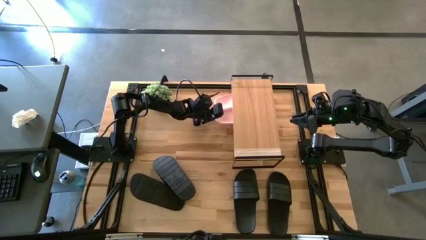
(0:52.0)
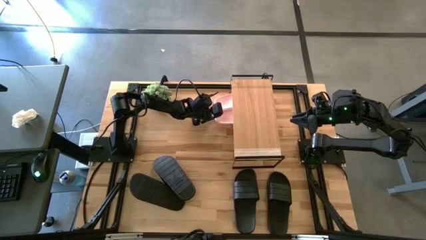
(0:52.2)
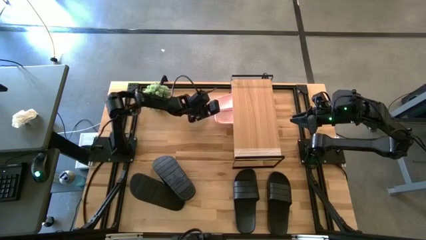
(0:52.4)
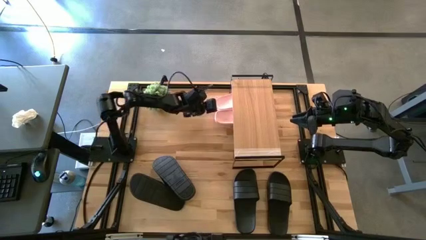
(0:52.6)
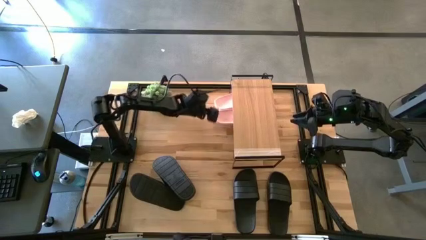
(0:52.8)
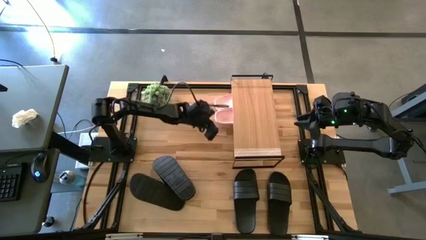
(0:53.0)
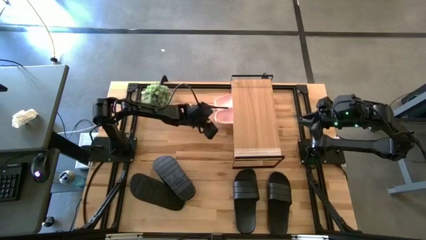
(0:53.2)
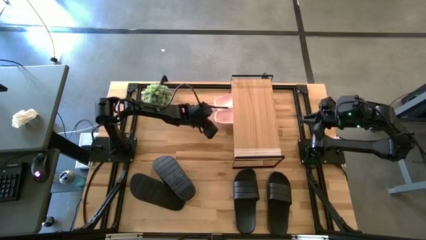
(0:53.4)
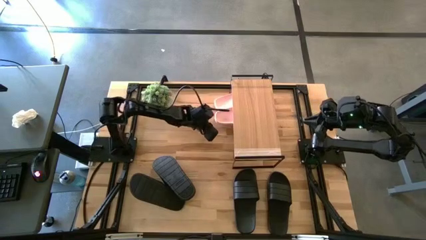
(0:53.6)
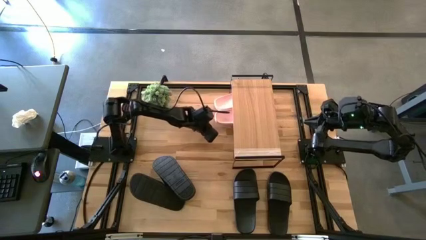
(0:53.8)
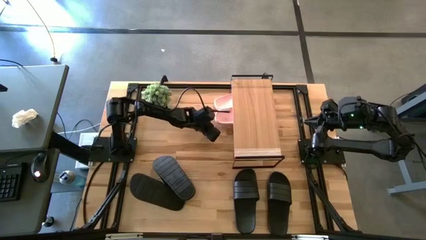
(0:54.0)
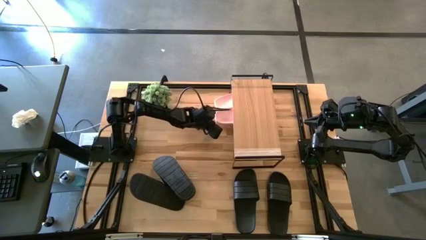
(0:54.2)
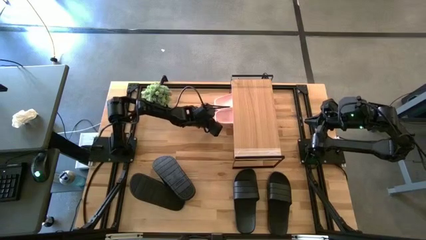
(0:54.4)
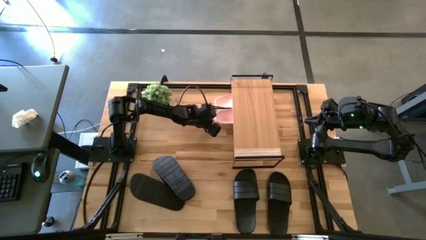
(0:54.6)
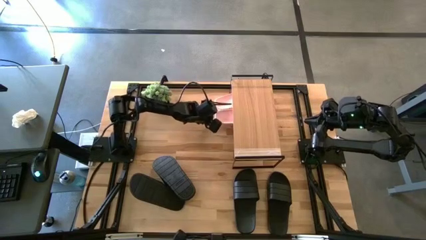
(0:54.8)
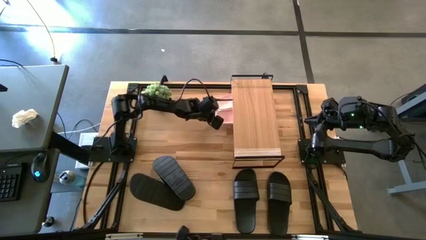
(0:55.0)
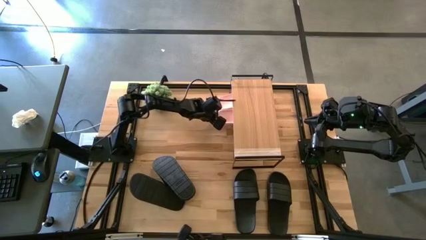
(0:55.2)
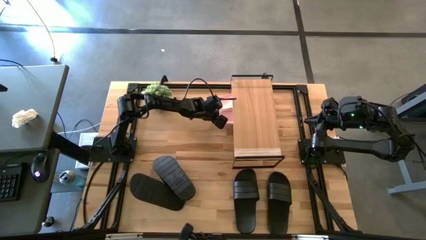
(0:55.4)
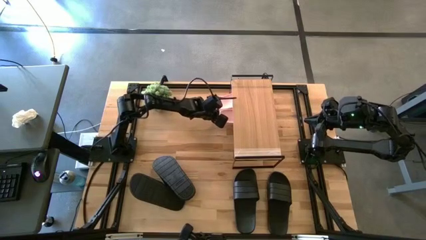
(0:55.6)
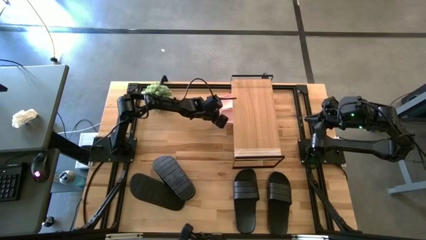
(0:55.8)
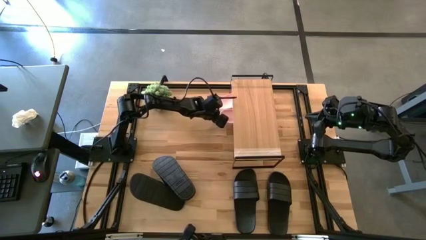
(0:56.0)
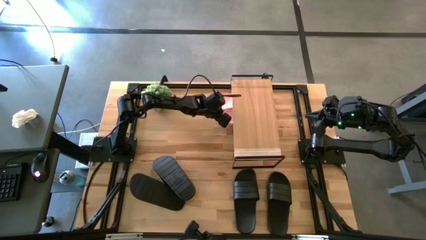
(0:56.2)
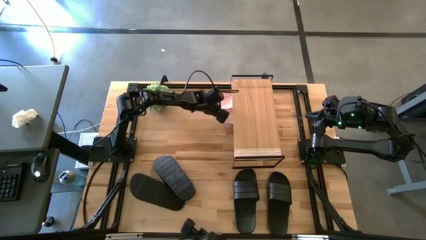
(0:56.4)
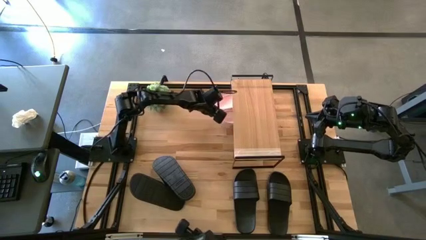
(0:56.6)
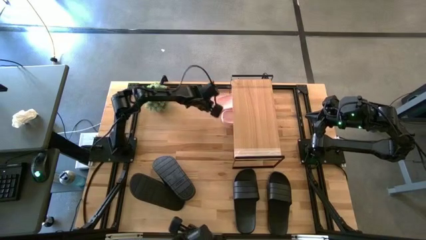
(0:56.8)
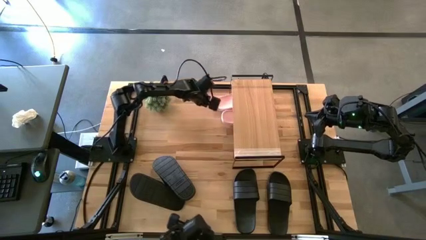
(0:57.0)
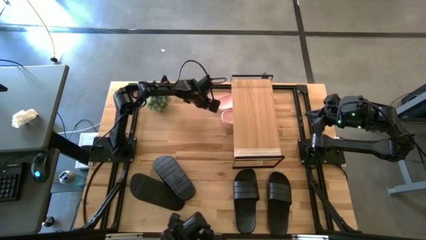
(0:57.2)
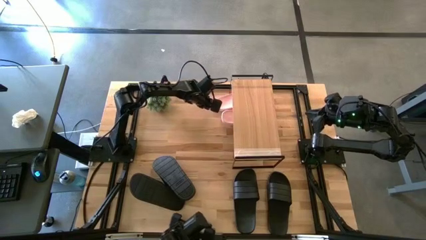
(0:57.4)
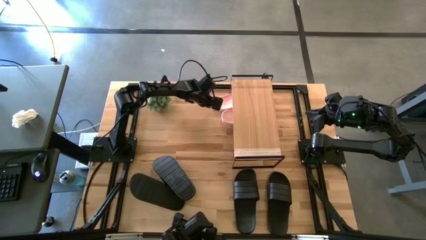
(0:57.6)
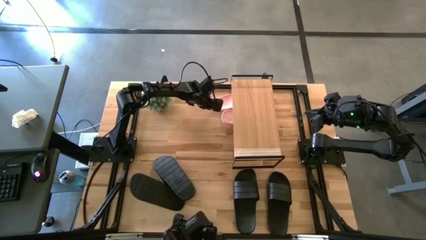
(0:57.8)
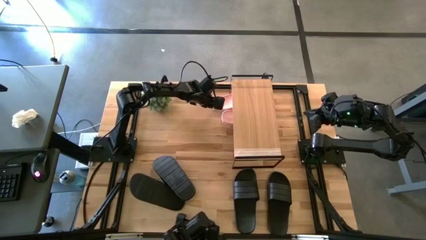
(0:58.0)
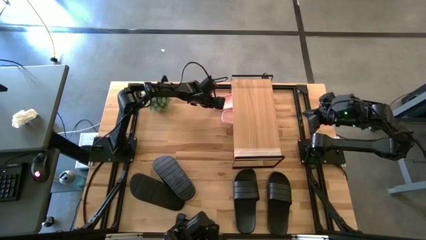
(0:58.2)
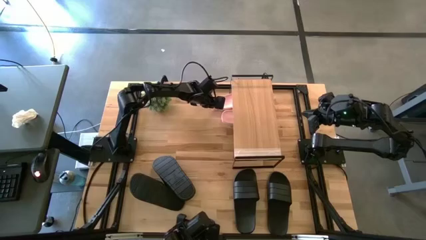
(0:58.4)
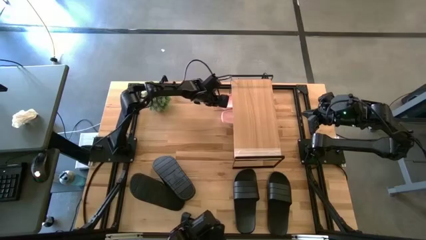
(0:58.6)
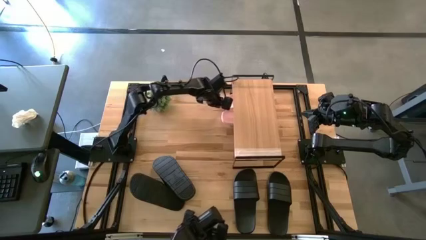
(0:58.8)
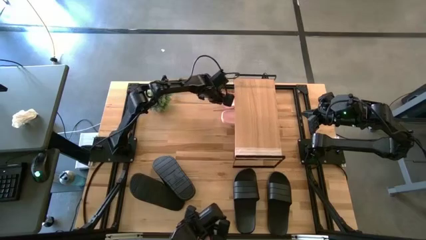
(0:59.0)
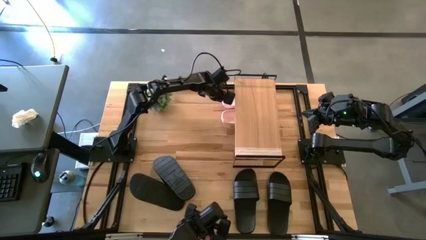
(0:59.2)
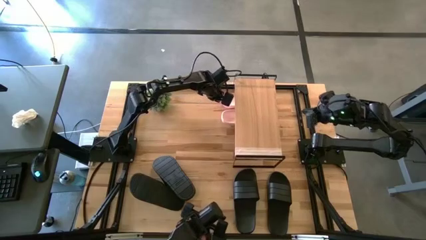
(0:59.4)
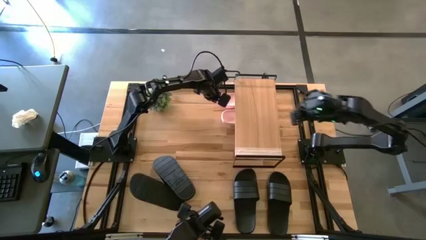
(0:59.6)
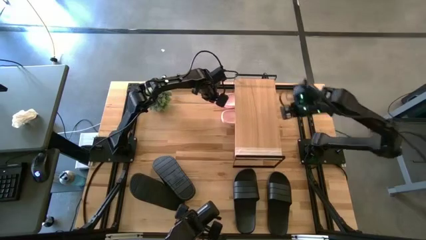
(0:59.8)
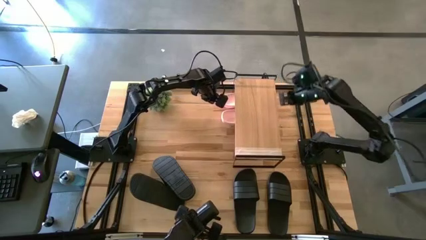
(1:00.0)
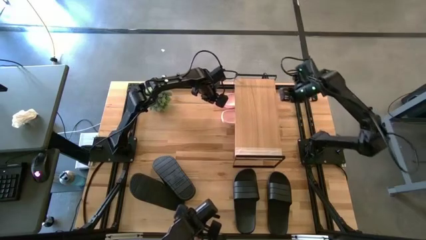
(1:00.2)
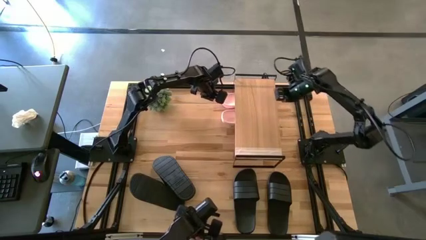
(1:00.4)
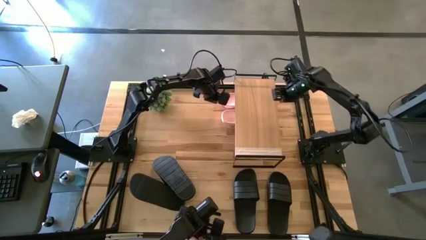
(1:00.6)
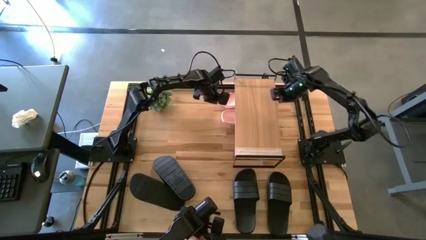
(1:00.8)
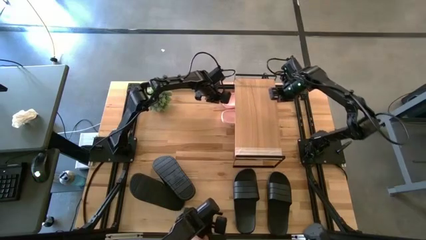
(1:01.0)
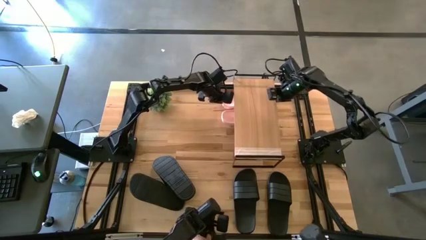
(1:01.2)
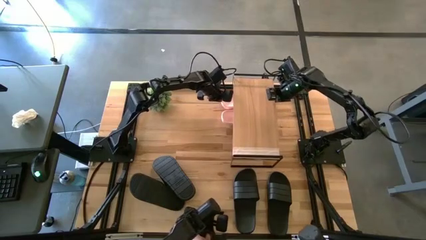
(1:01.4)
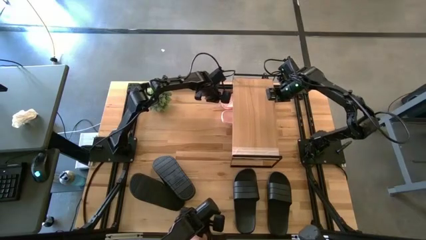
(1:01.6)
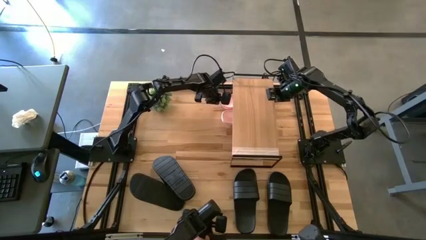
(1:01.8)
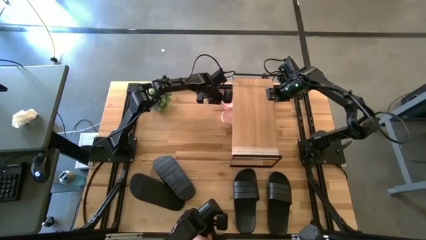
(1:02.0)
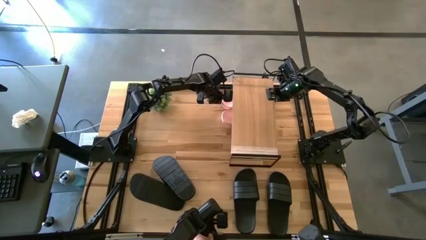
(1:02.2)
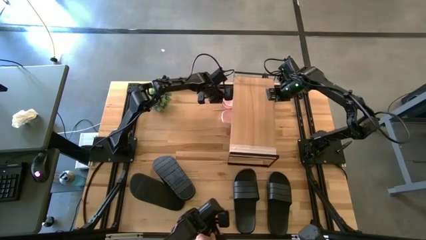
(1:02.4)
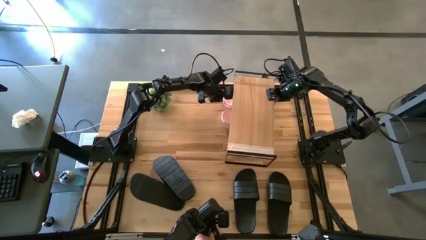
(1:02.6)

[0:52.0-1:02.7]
Task: Pick and place slides into the shelf
Adjust the pink slippers under the shelf

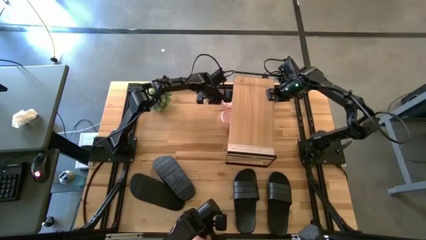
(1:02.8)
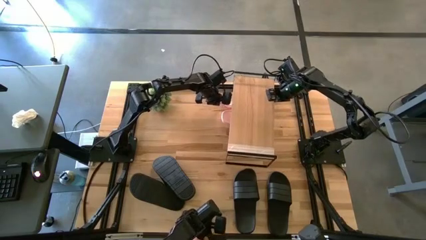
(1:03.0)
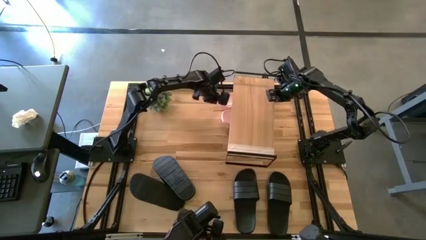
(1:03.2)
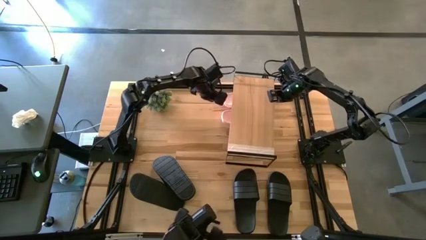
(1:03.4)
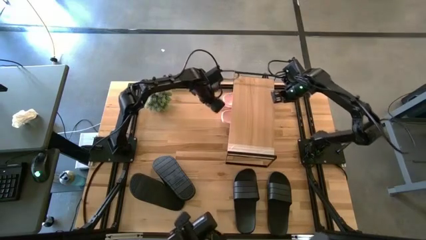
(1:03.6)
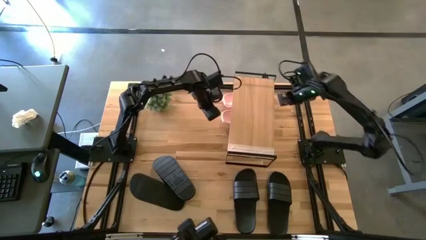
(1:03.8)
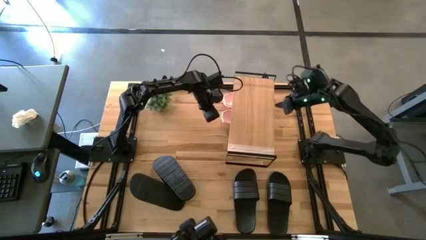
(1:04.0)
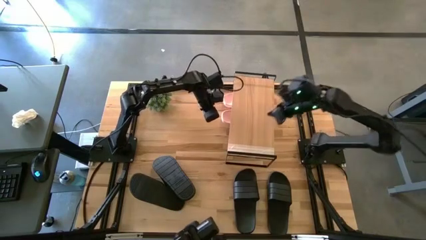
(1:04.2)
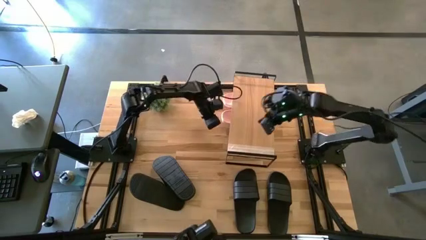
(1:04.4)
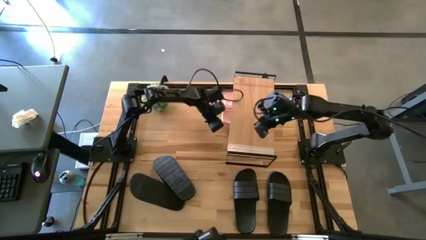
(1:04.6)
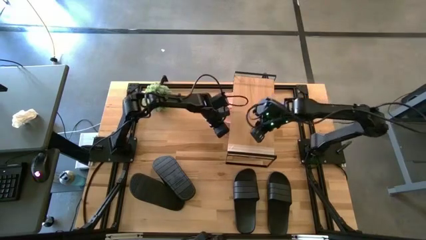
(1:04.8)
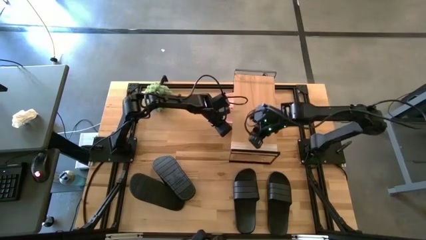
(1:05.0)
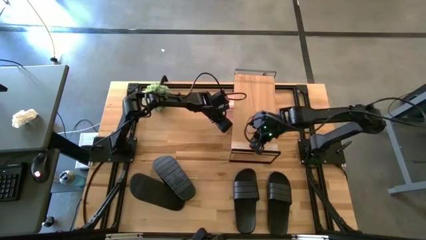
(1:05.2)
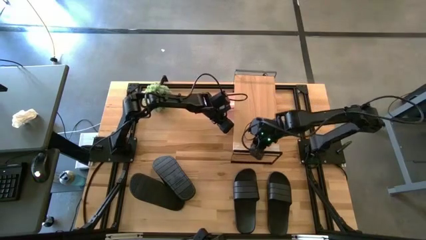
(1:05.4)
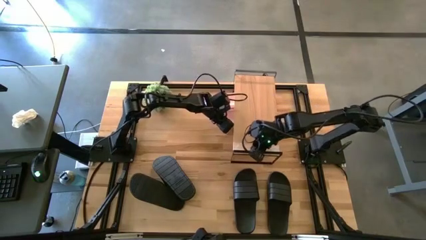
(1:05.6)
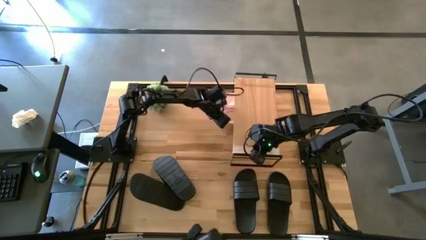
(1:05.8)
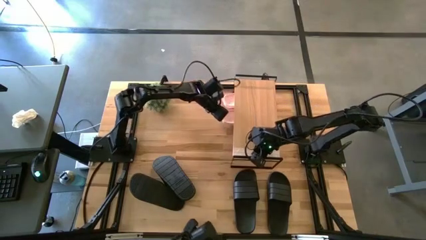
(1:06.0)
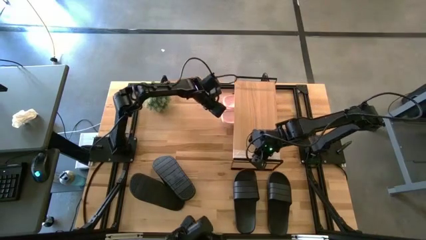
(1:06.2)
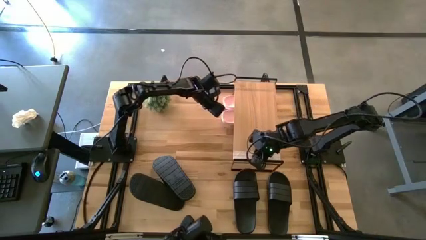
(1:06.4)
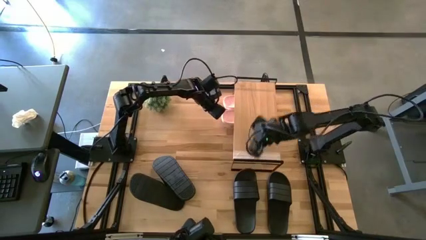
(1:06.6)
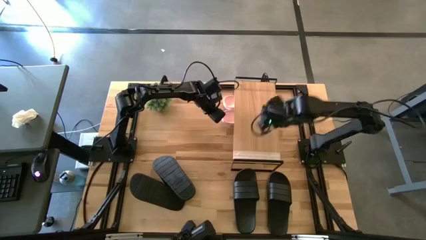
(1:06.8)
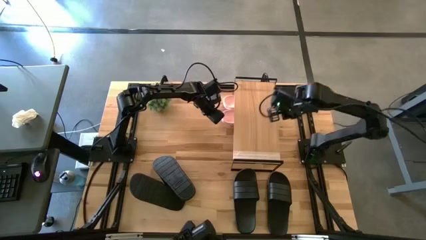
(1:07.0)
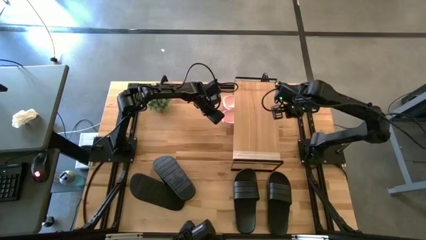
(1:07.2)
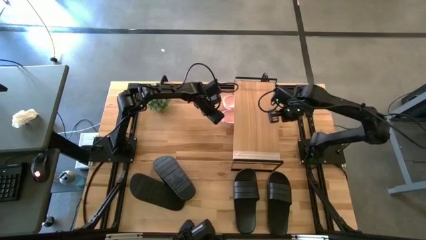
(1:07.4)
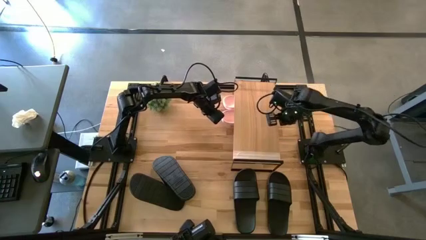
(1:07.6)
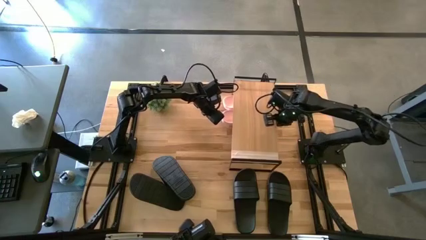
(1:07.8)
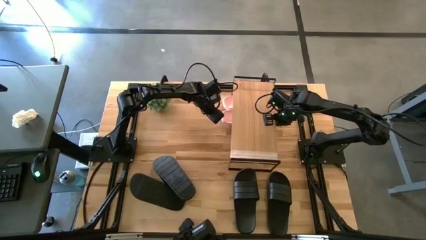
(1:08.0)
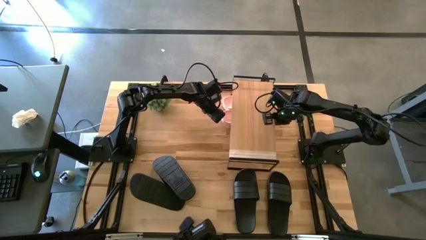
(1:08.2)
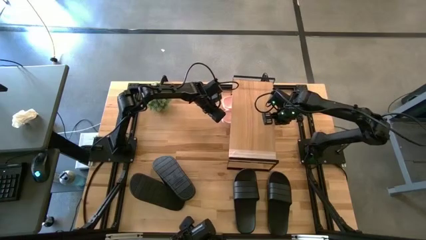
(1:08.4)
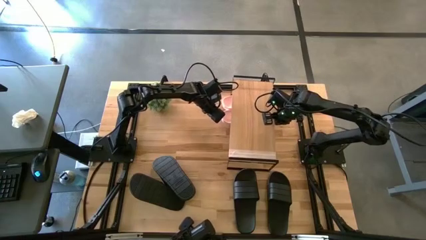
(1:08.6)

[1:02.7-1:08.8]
Adjust the shelf
